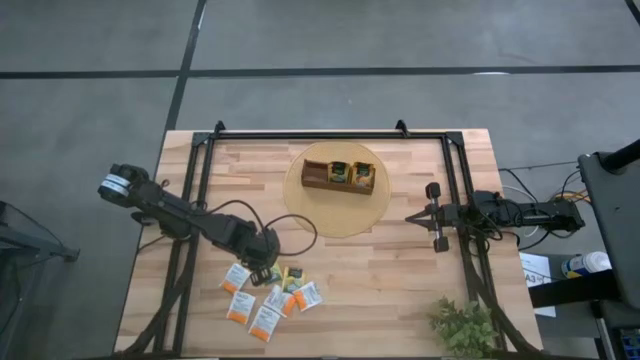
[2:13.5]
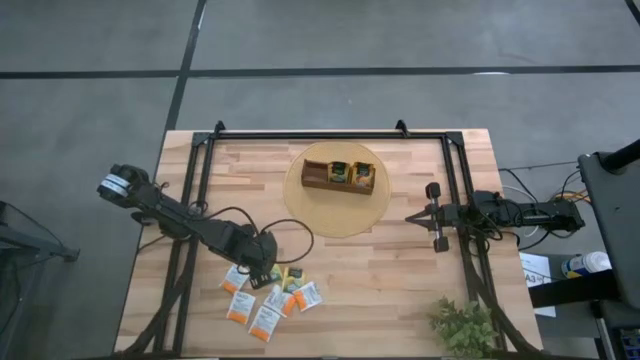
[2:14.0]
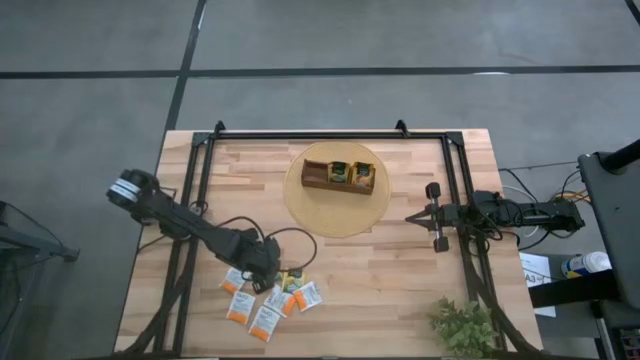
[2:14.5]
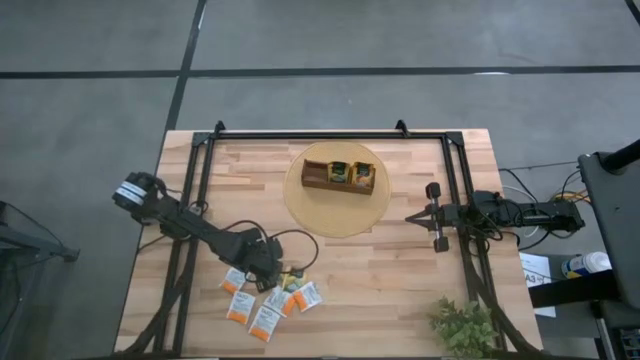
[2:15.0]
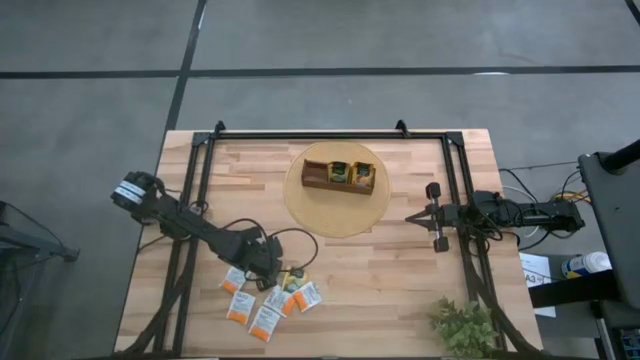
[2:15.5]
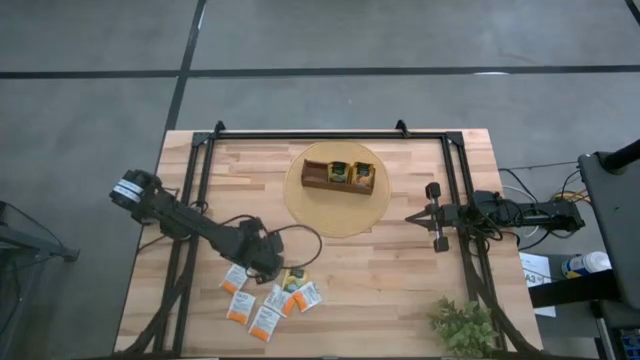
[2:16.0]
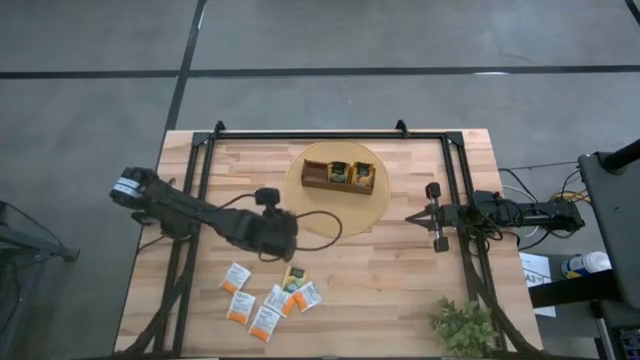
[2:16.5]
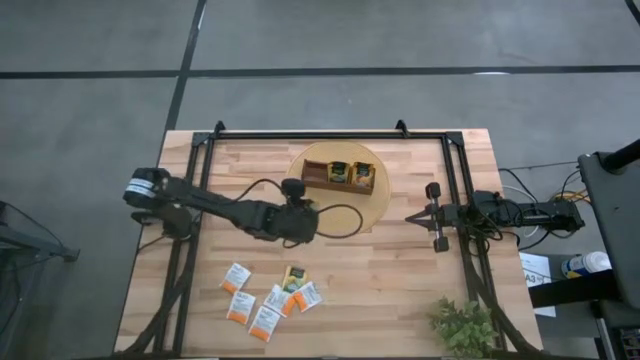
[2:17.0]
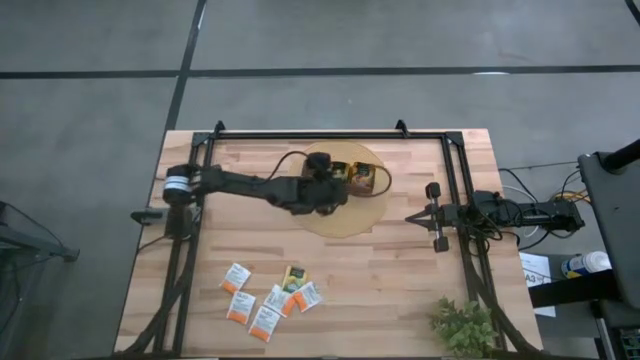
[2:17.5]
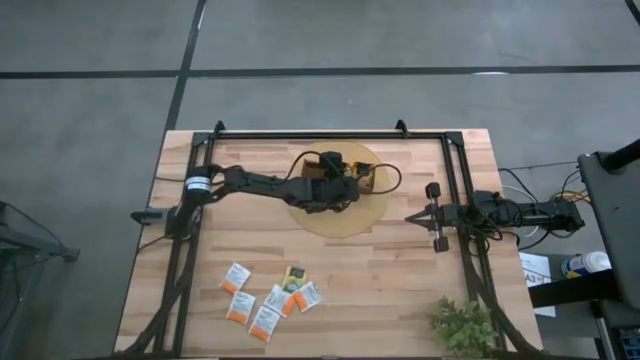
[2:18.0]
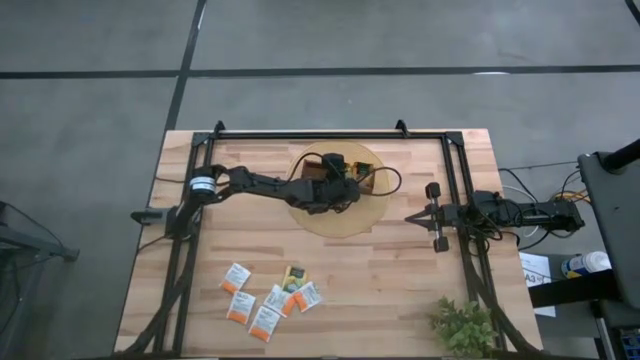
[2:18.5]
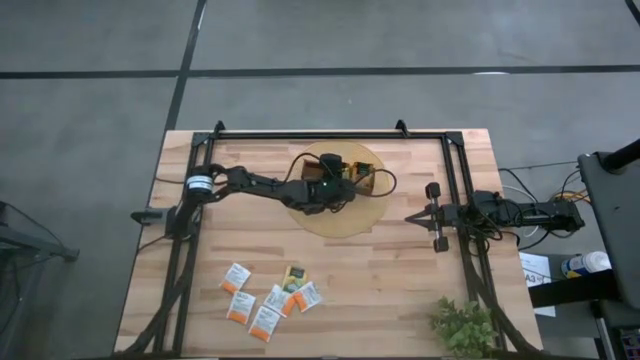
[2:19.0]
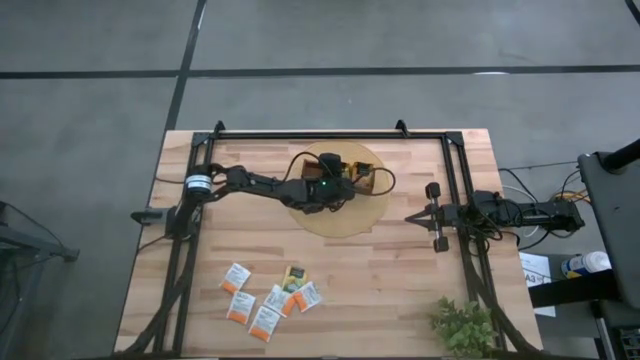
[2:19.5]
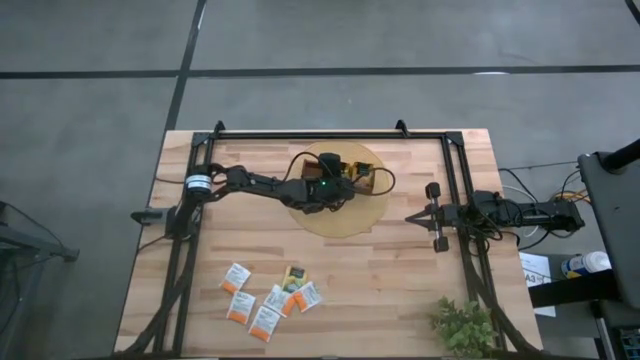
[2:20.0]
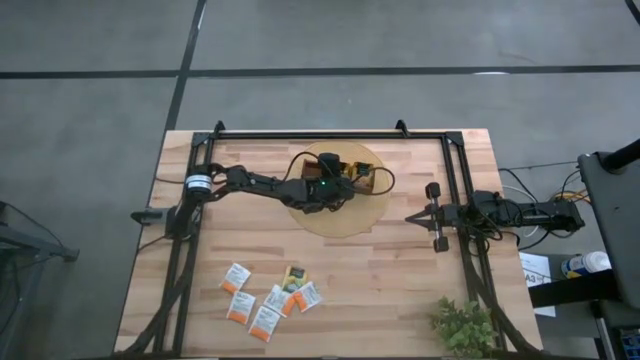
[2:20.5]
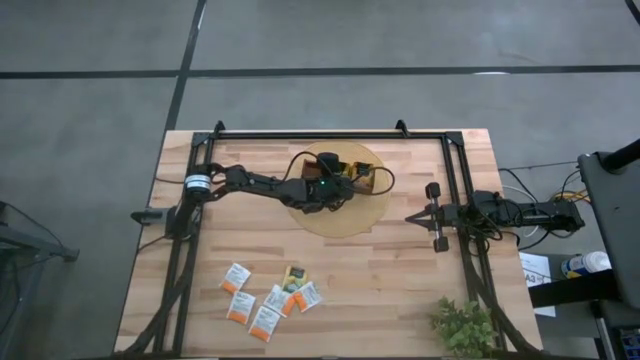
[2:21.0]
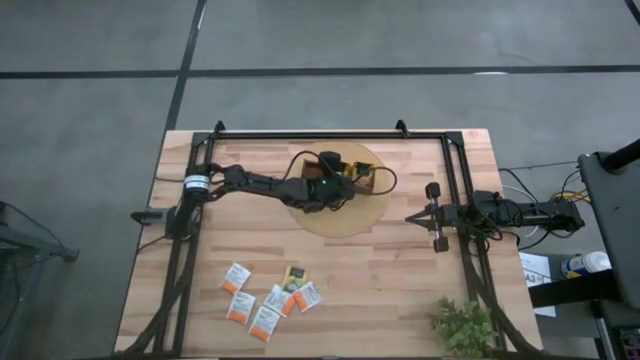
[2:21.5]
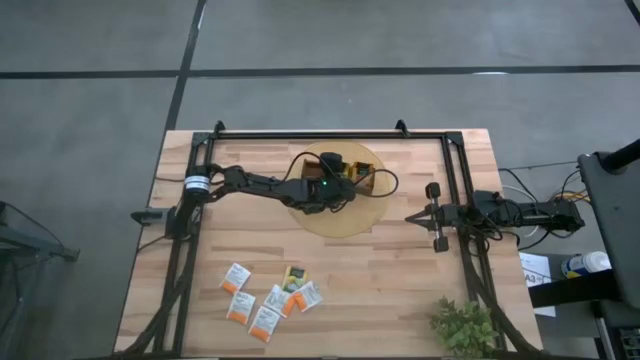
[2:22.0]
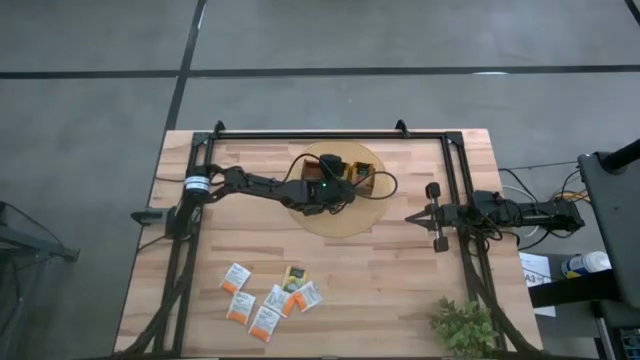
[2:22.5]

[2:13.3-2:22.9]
Task: Pick & Place Tea
Put left green tea bag into the middle section of wooden organizer

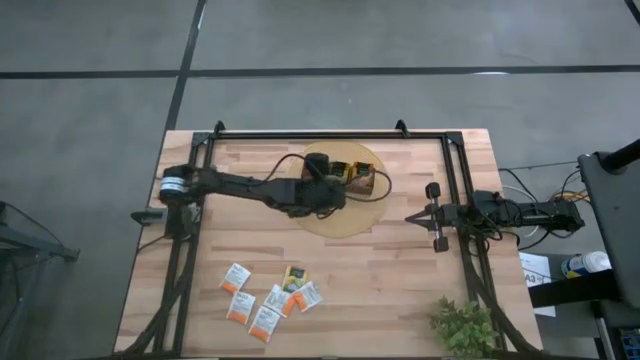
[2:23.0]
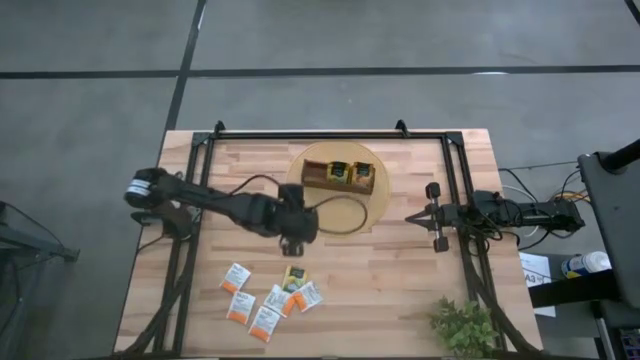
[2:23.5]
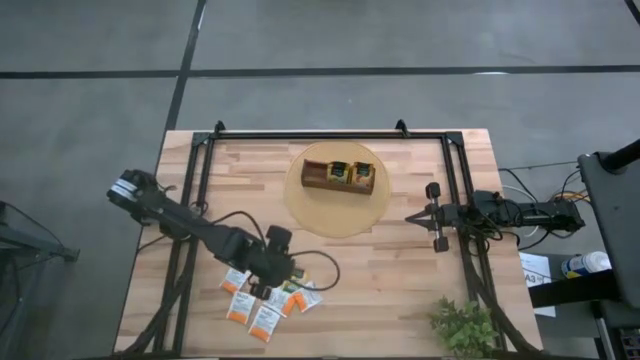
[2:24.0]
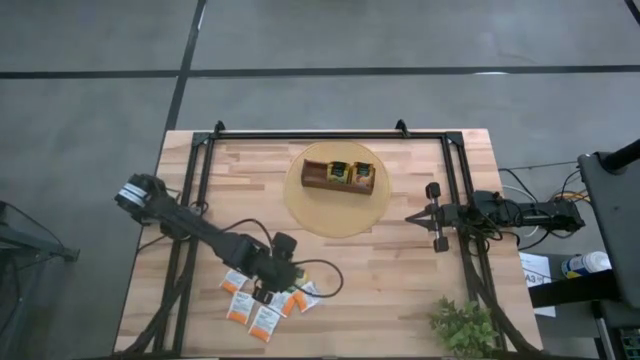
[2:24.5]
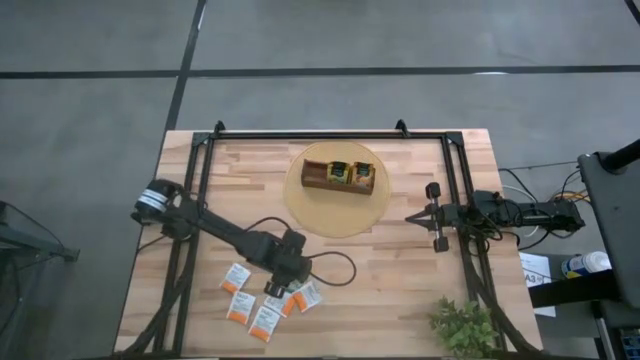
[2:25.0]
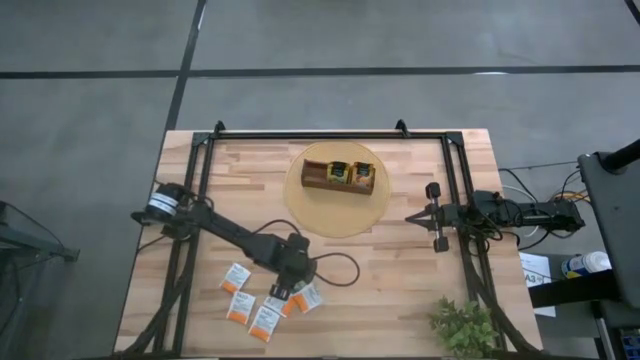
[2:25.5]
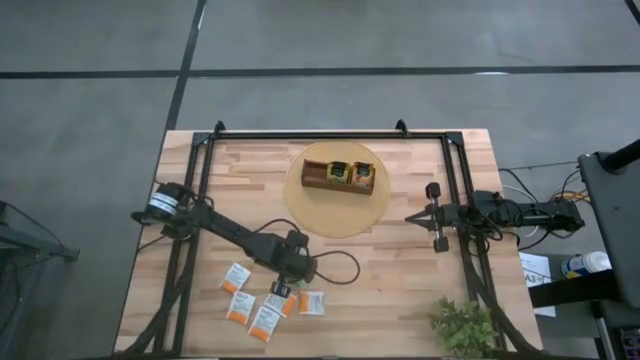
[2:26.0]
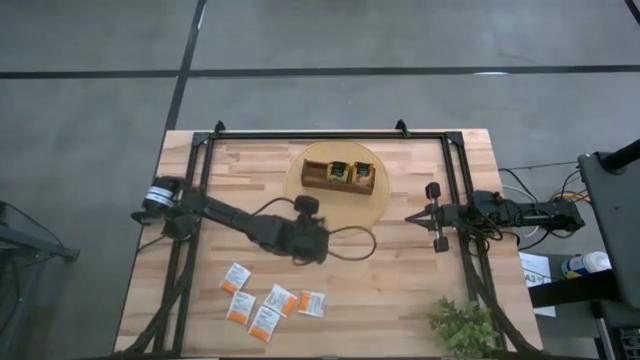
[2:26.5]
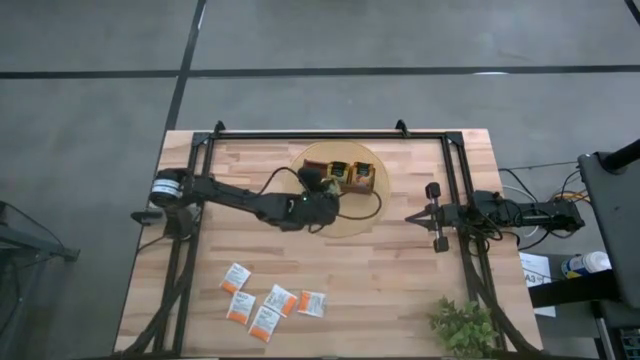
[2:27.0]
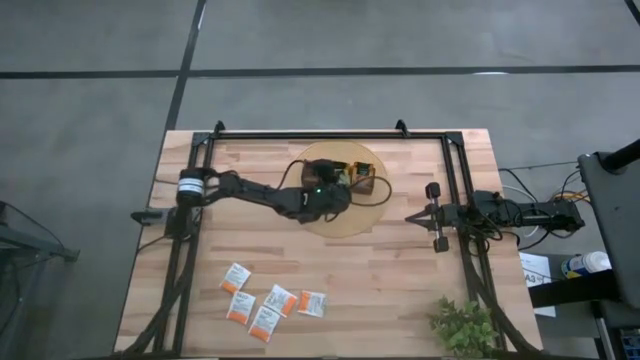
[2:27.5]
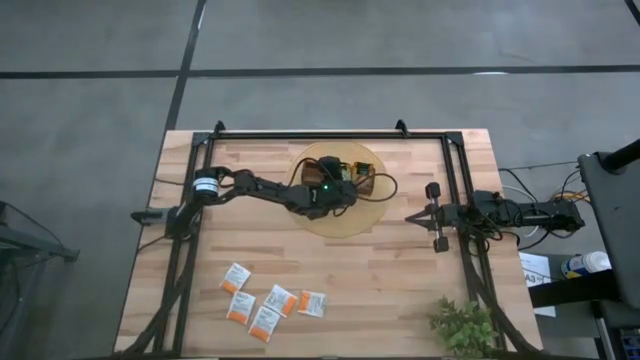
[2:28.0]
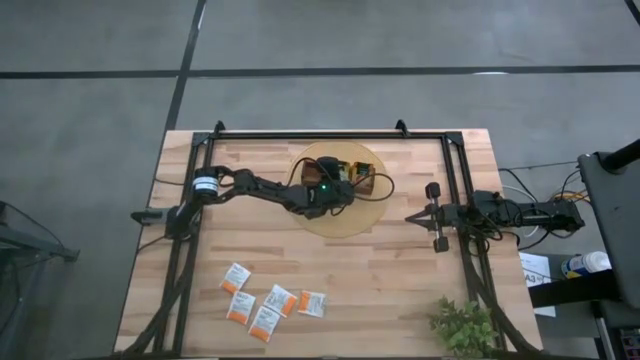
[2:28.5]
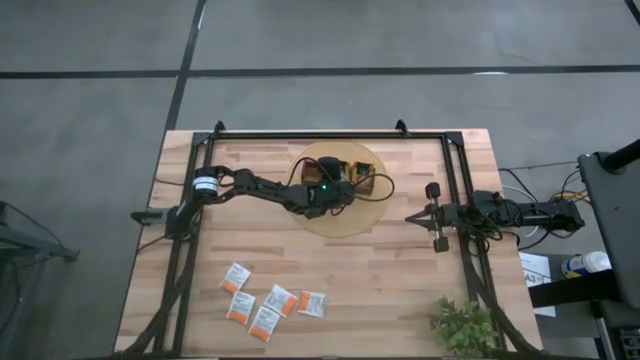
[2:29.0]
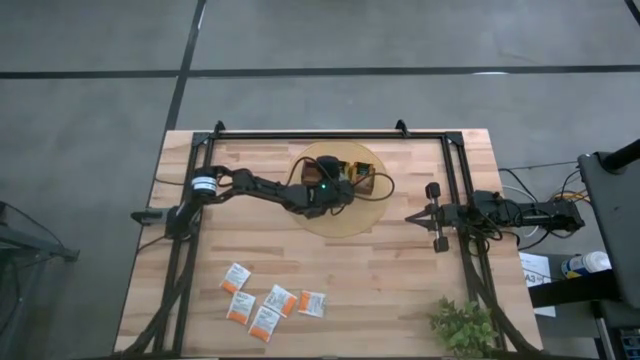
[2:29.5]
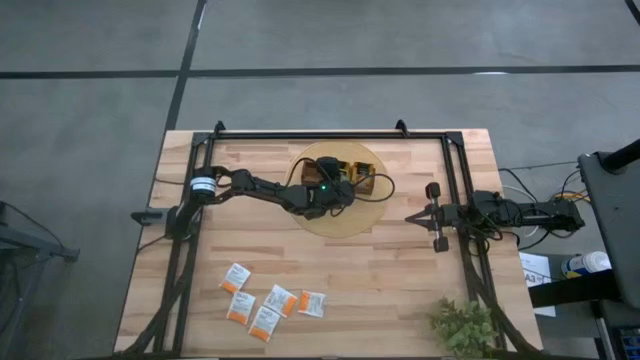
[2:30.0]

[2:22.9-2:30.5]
Put the green tea bag into the middle section of wooden organizer

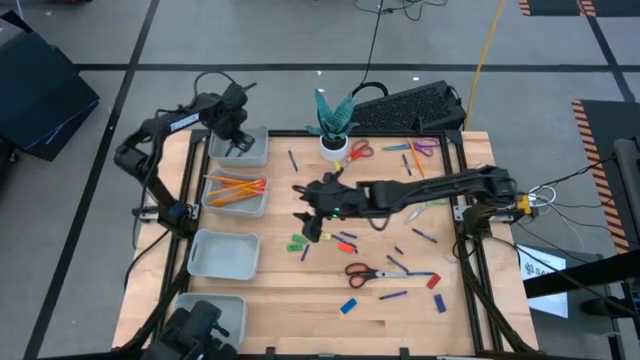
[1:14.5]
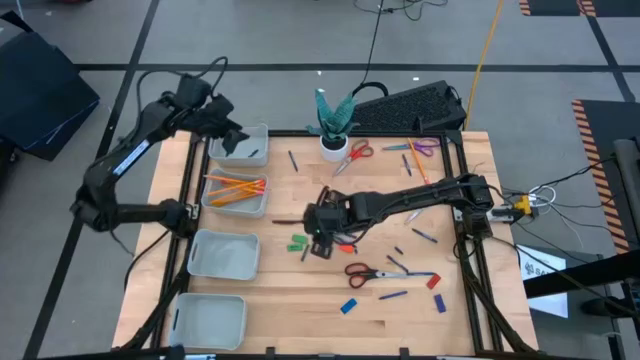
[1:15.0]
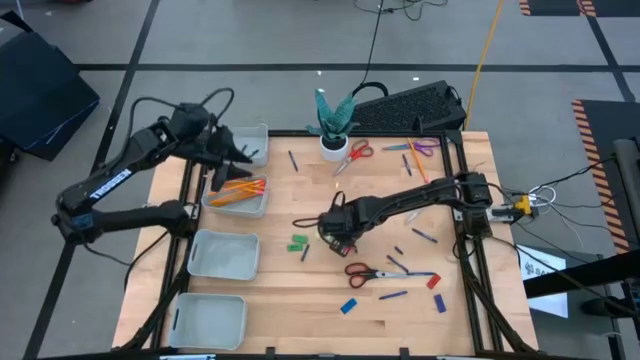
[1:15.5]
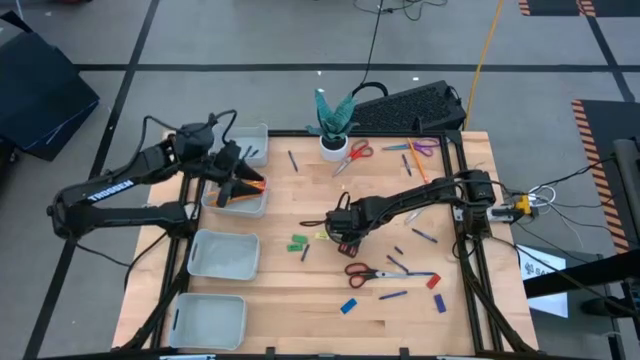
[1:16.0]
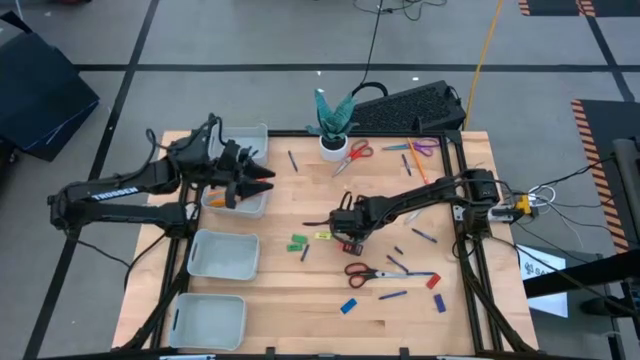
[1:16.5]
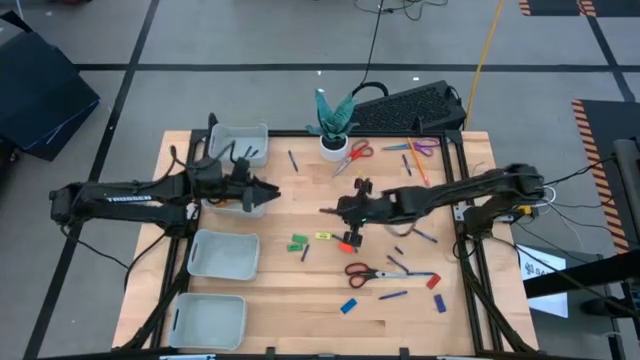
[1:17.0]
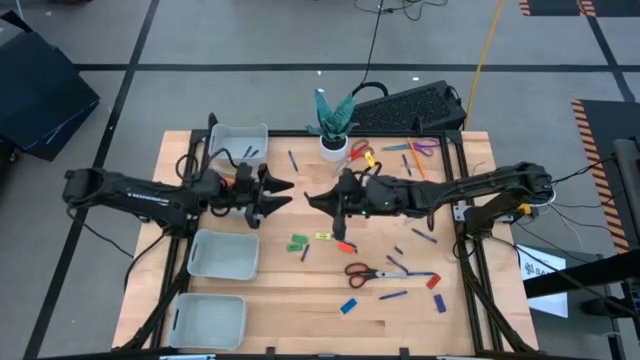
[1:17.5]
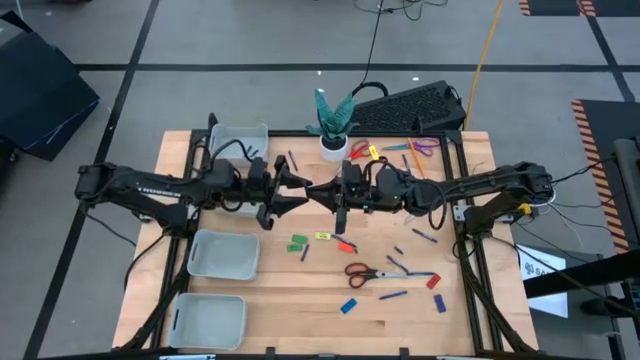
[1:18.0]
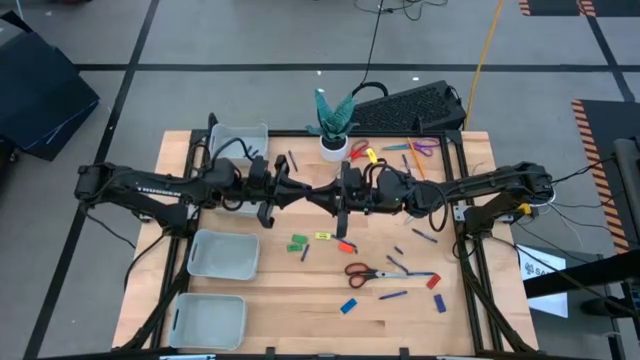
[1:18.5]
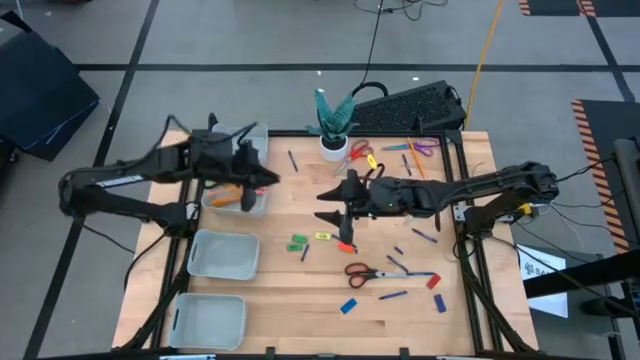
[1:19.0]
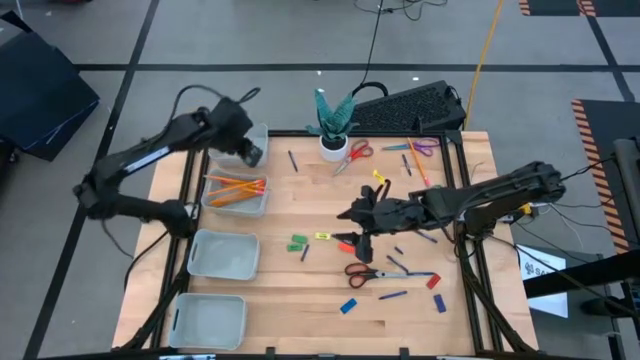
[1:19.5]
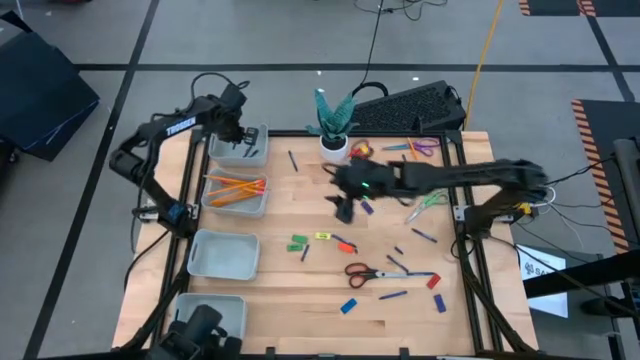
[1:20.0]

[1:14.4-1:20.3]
Task: Sort crayons/erasers/pens/pencils in bins
Put the blue crayon into the top gray bin
